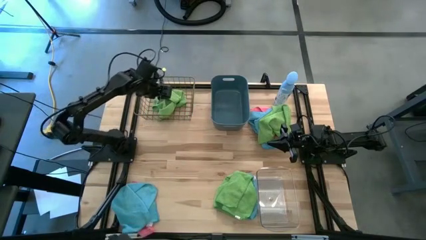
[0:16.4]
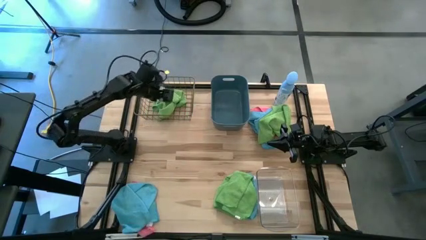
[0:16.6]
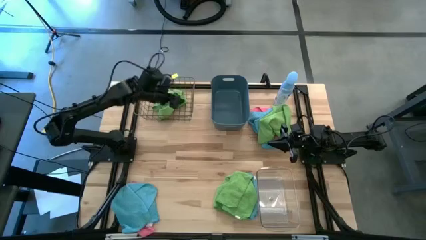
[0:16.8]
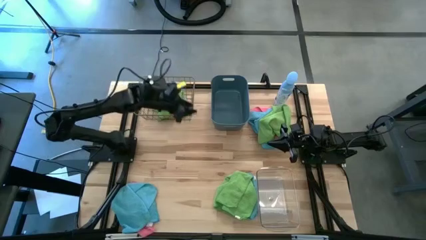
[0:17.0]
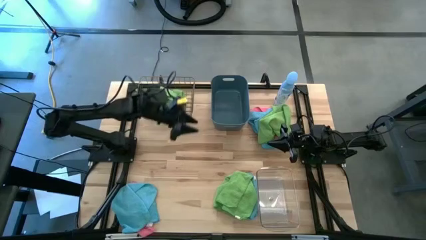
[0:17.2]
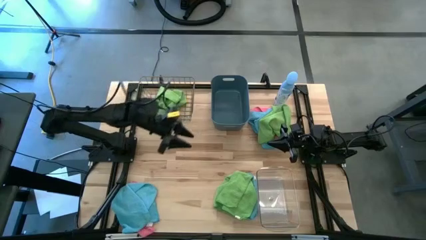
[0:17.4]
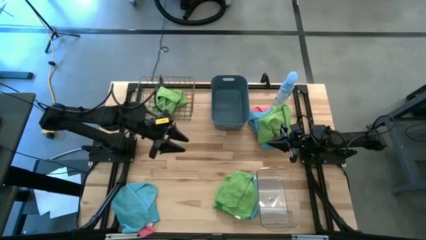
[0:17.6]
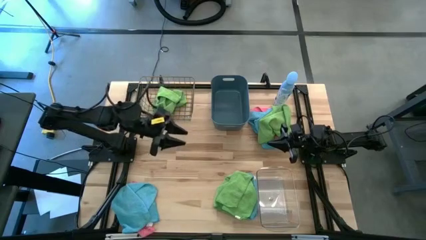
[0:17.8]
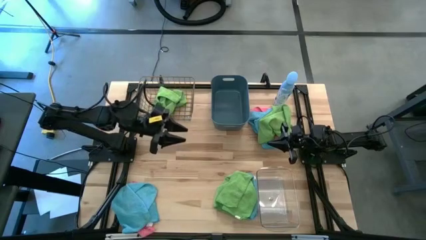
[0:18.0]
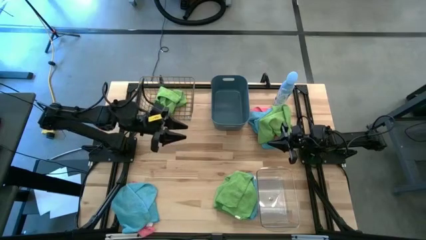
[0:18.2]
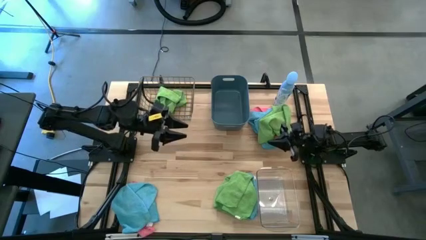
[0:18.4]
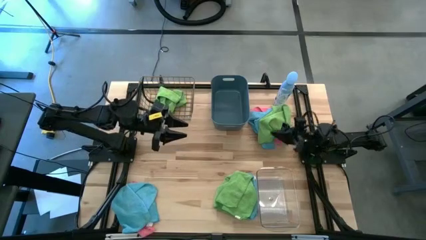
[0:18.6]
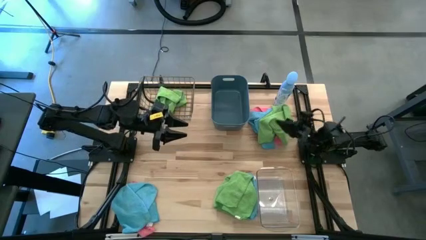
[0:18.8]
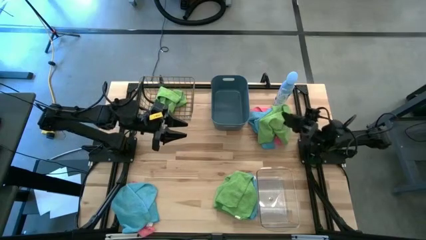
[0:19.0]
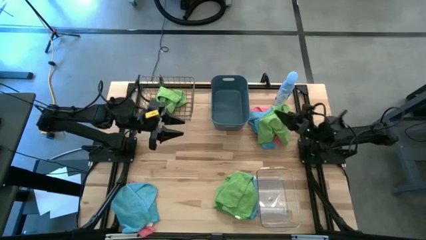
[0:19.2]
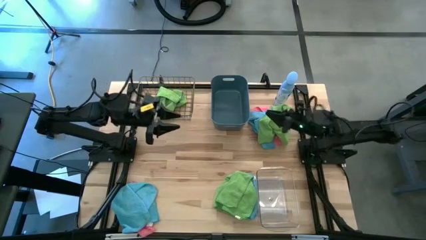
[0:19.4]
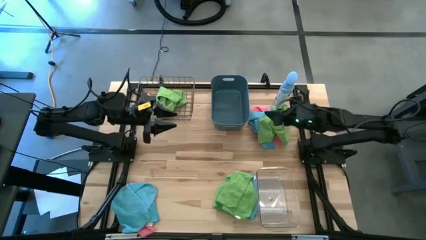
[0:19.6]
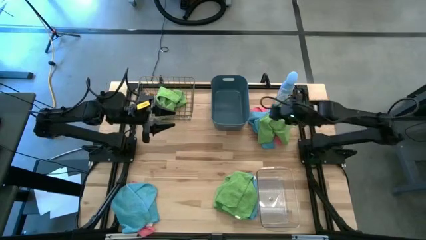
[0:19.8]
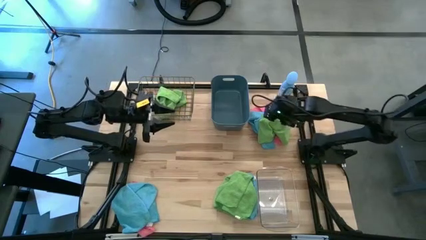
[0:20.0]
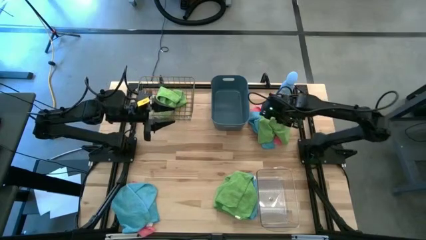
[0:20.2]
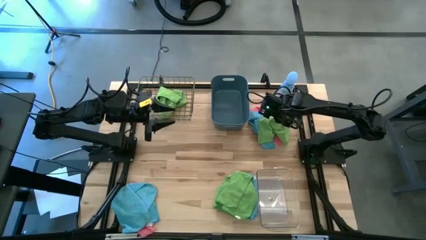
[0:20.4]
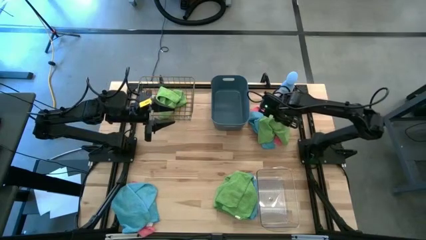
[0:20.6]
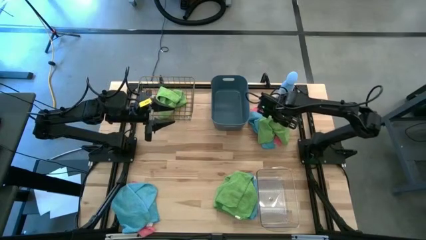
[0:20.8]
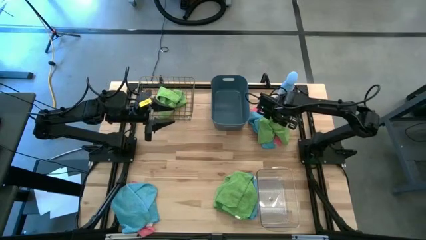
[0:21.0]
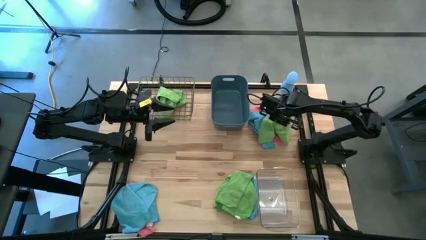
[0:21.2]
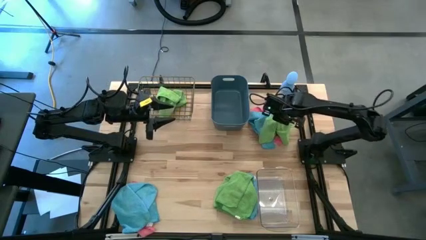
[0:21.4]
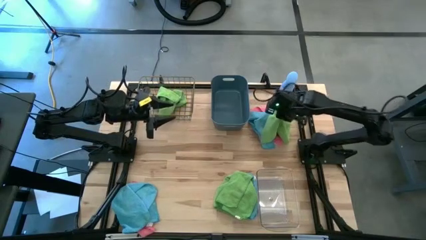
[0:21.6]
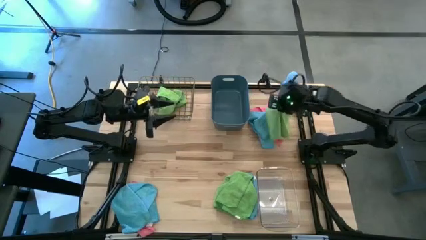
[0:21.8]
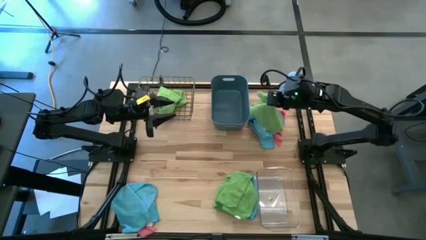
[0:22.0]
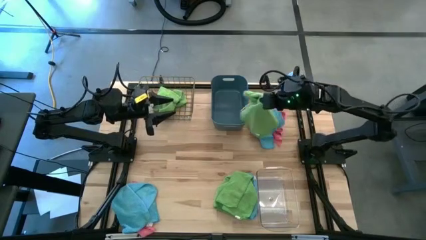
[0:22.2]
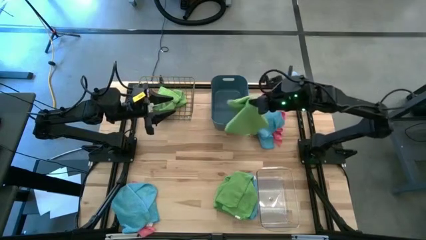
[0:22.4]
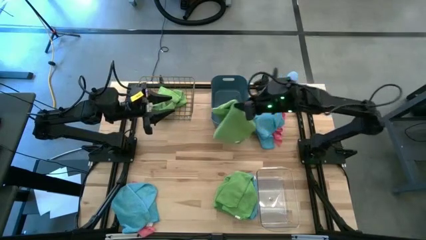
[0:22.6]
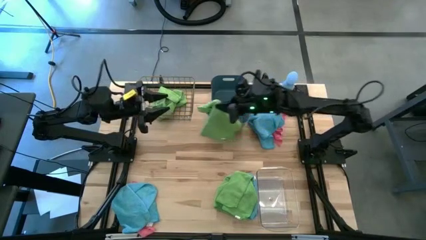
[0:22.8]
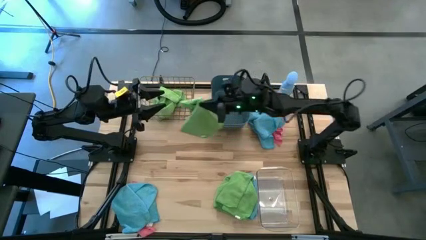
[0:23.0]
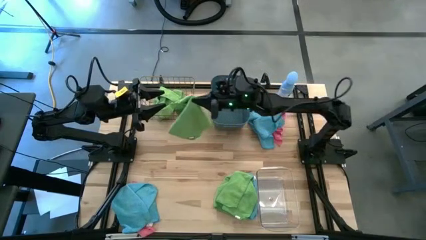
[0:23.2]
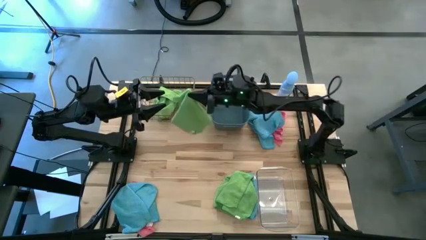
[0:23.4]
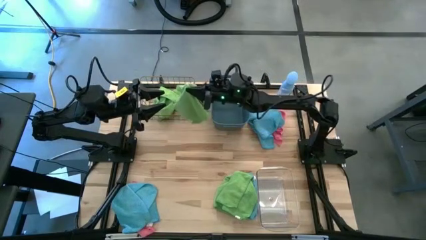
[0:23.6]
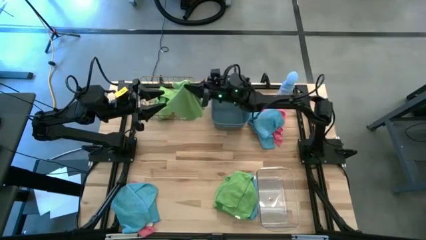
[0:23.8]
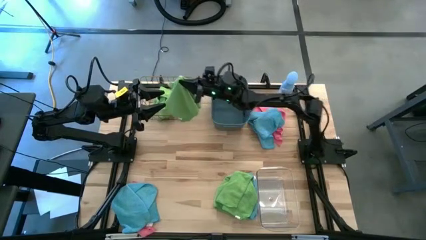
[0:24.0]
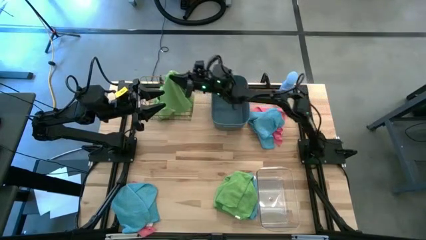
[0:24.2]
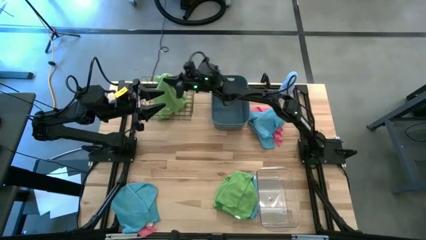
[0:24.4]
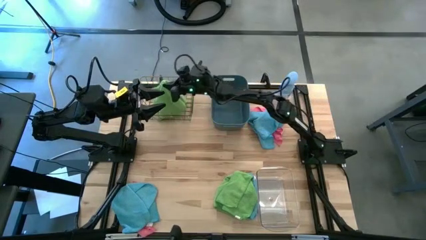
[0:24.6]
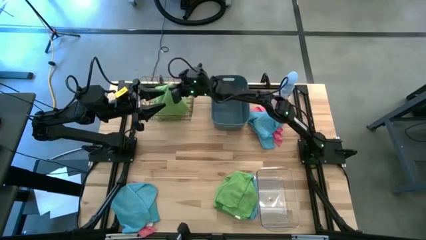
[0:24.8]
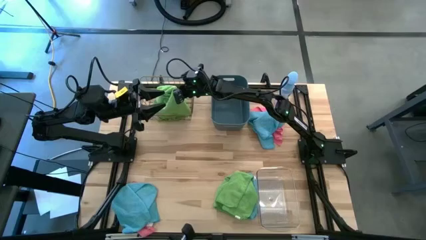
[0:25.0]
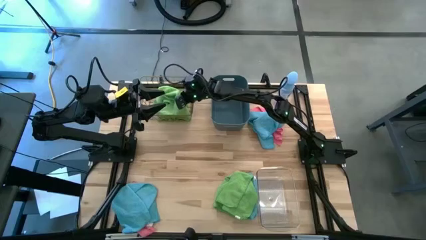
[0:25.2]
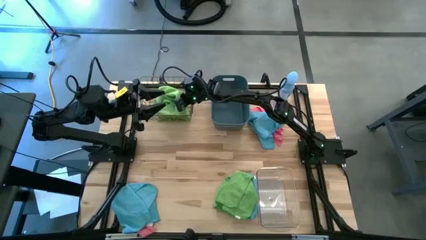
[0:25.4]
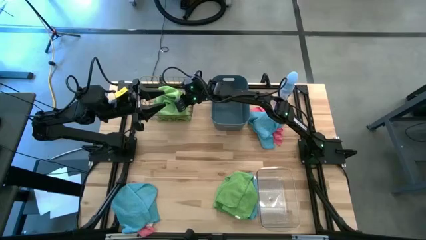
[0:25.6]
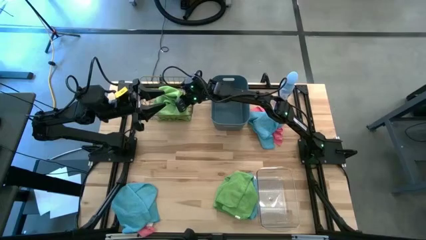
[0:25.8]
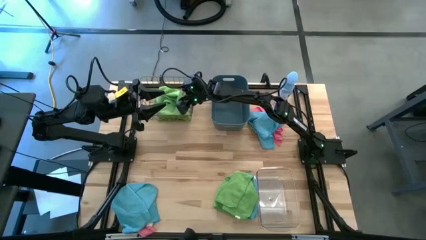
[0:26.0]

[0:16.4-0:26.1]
Task: Sort microfiber towel by color & place in baskets
Put the top green towel into the wire basket

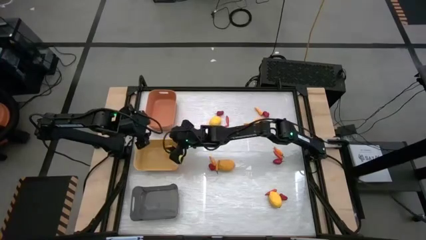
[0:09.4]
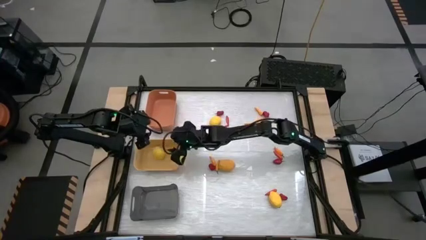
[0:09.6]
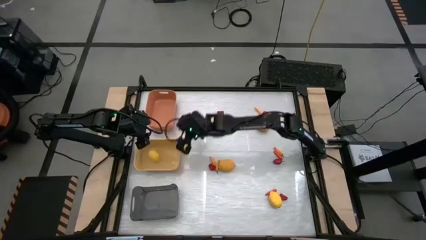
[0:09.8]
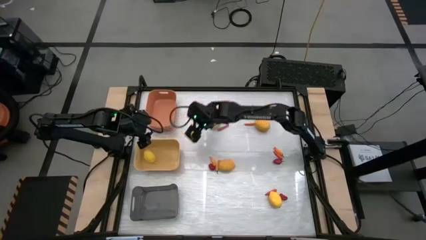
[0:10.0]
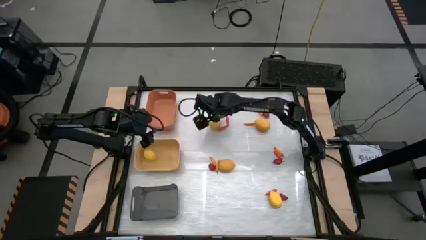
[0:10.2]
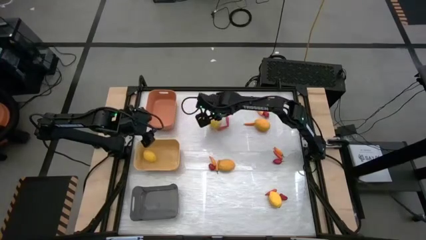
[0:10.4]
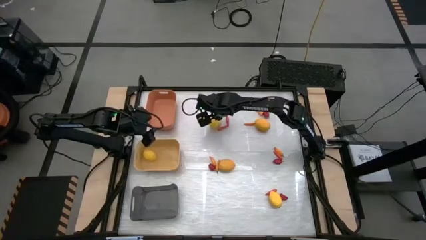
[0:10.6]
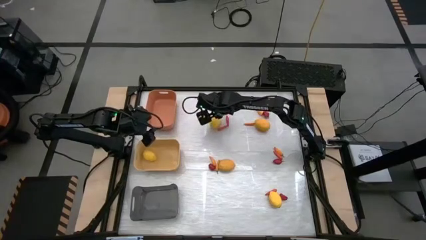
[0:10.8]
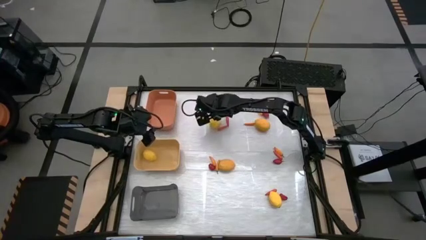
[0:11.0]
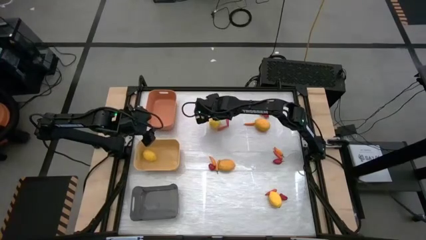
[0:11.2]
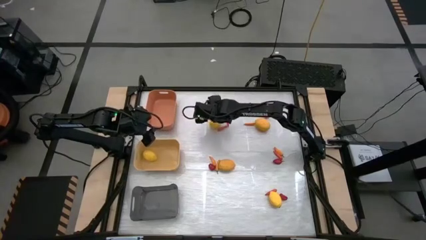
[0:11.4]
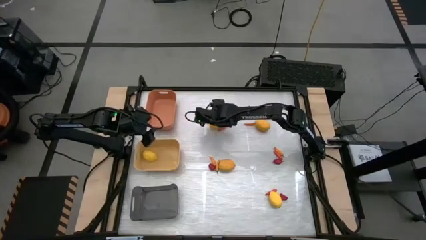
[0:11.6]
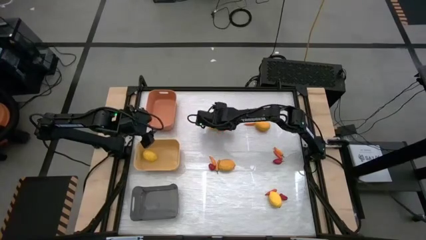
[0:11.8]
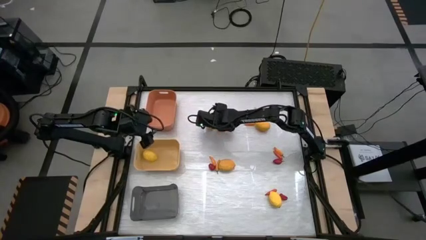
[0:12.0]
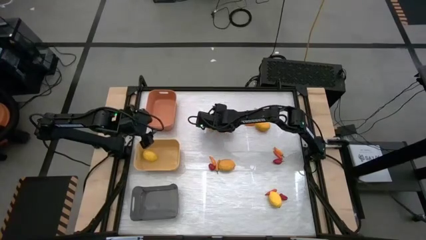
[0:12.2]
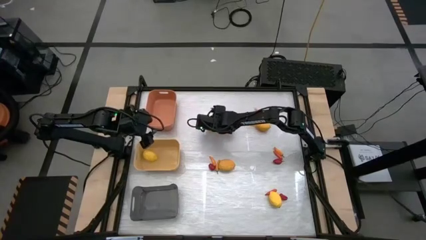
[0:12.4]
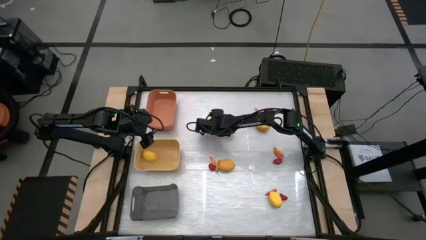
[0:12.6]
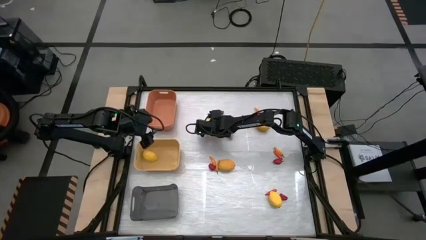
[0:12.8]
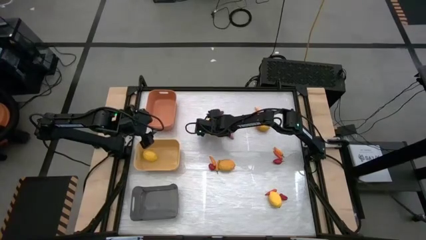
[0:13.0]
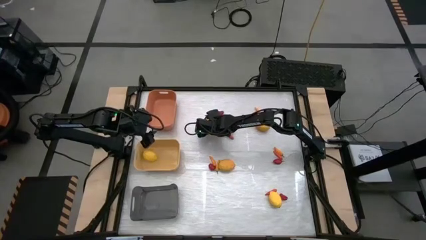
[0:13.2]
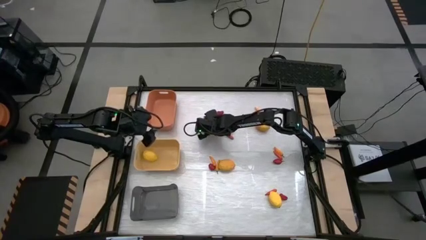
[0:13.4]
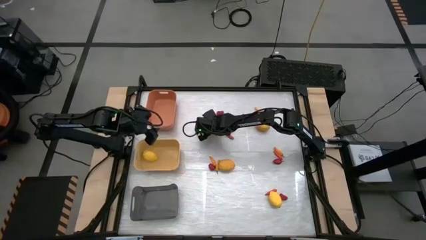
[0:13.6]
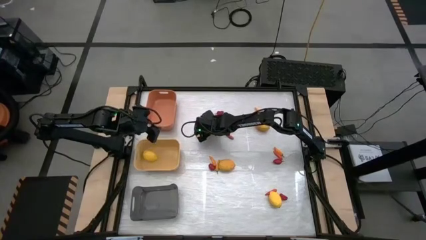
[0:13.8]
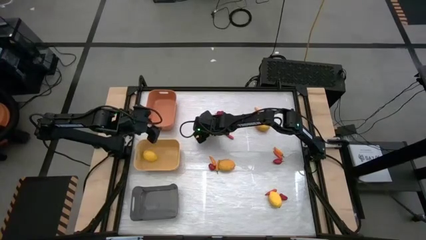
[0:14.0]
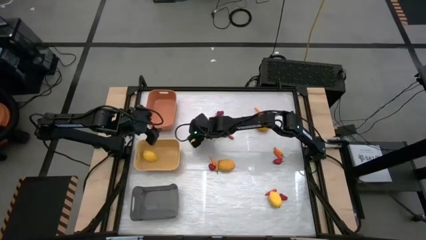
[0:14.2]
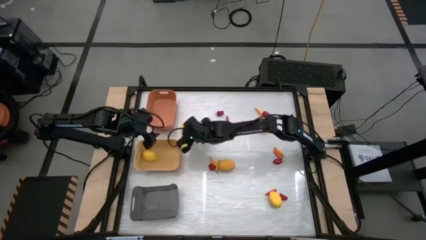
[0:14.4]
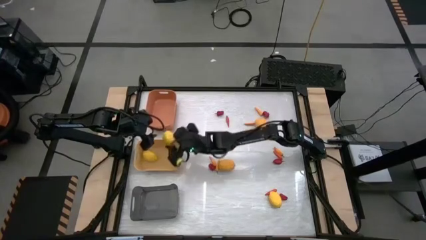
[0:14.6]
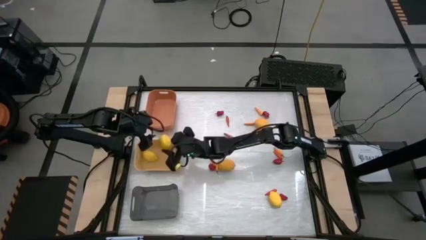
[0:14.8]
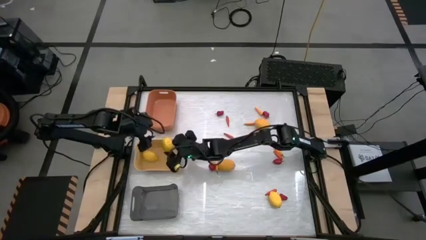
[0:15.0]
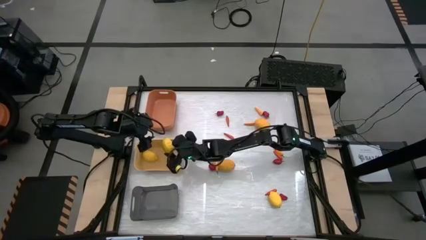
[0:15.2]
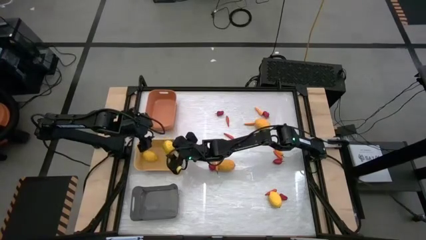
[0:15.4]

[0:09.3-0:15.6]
Task: Sort produce into baskets
Put the yellow lemon into the yellow bin

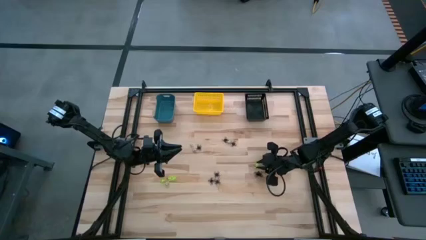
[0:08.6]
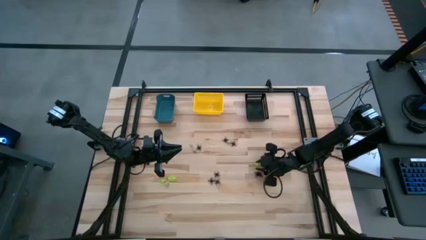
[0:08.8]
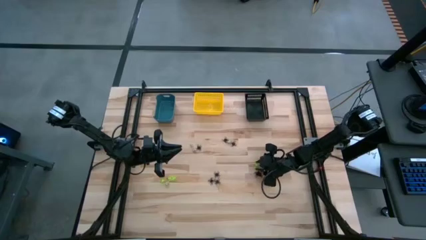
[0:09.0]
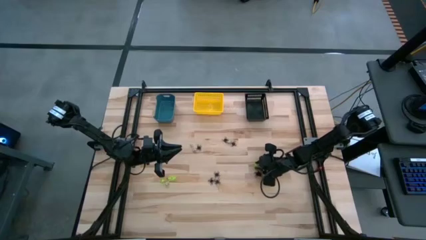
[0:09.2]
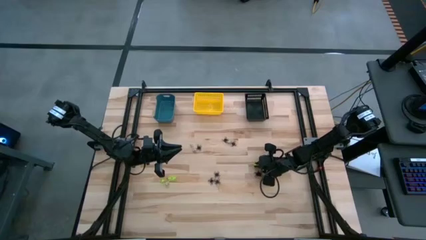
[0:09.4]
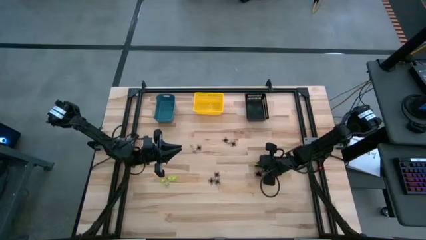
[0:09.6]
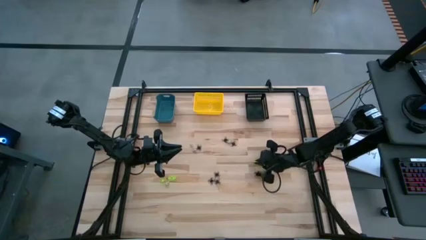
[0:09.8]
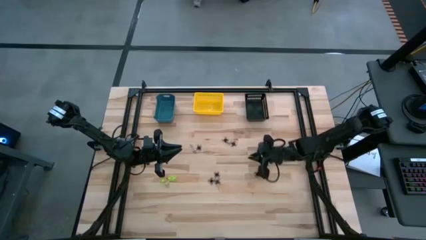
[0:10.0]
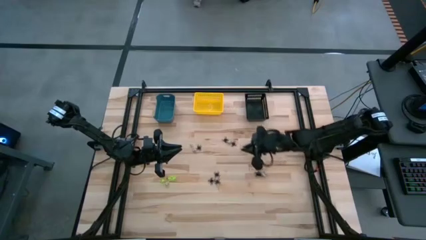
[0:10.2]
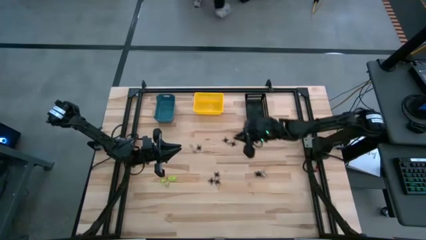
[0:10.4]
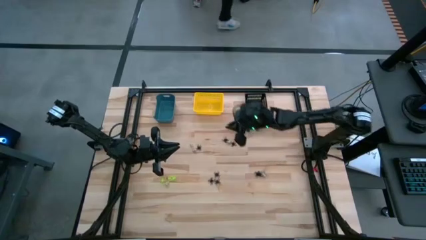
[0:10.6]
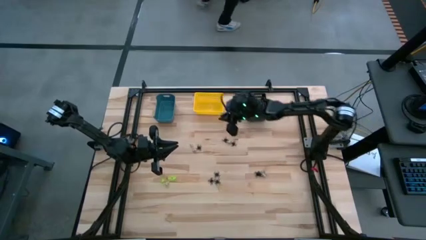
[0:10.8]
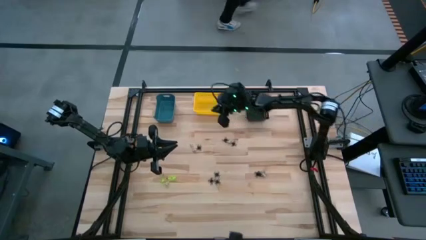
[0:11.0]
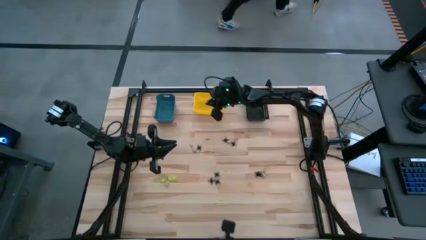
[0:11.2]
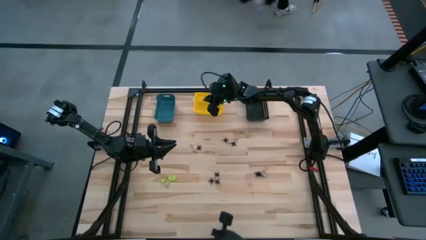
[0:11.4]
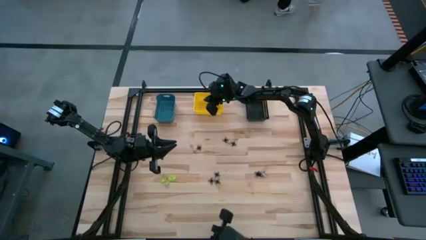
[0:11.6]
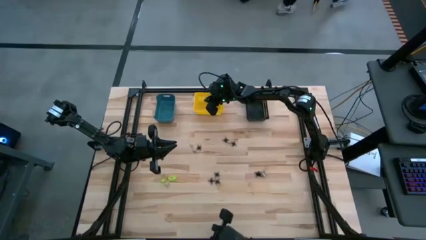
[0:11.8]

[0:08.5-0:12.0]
Task: Sort Halloween decoration
Put the green spider toy into the yellow bin
